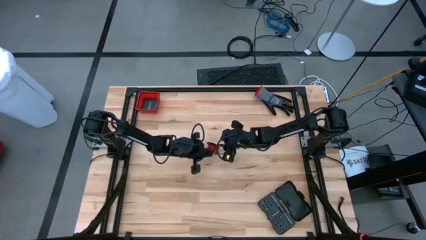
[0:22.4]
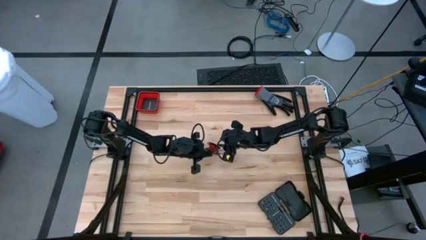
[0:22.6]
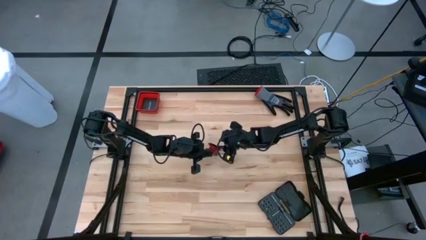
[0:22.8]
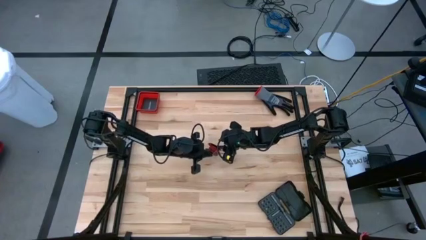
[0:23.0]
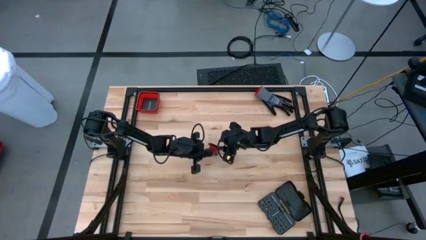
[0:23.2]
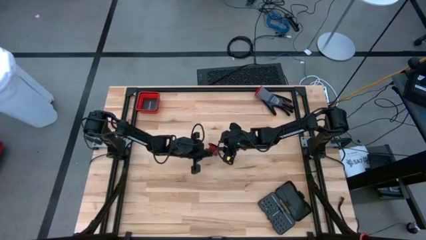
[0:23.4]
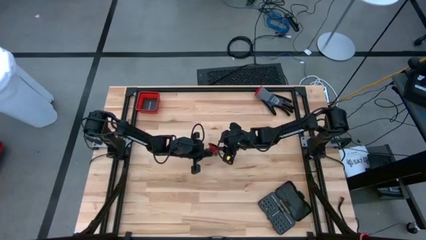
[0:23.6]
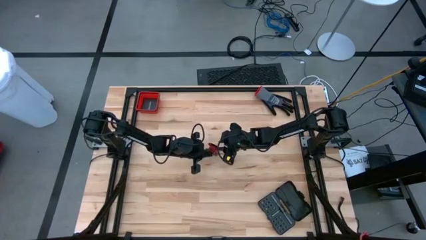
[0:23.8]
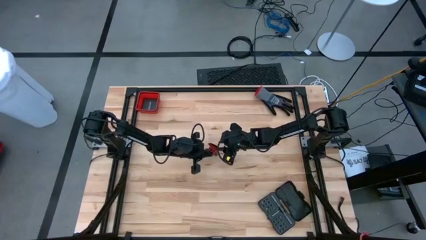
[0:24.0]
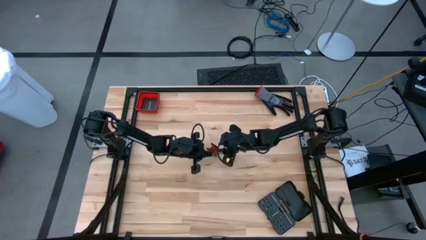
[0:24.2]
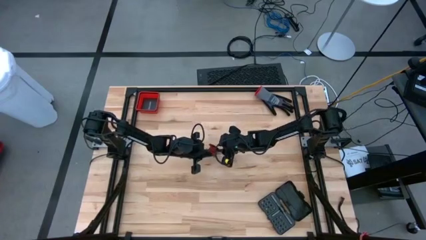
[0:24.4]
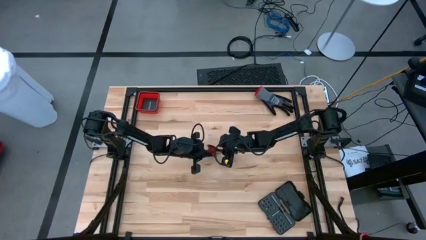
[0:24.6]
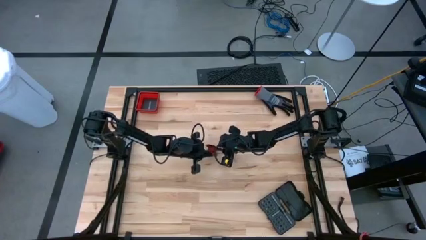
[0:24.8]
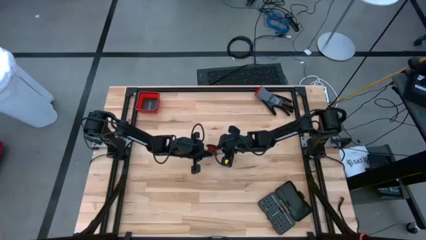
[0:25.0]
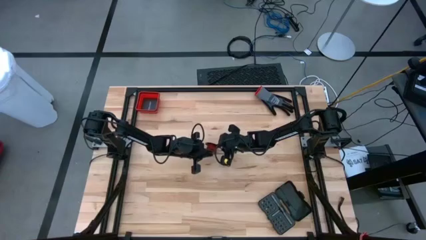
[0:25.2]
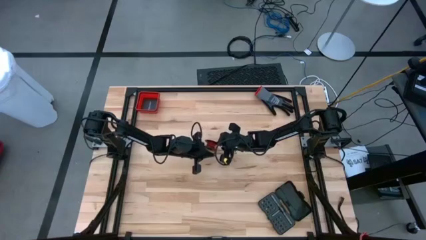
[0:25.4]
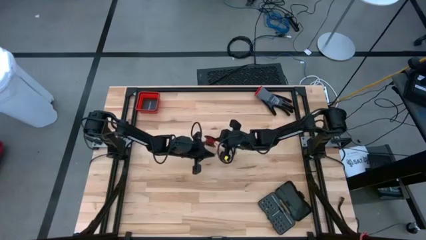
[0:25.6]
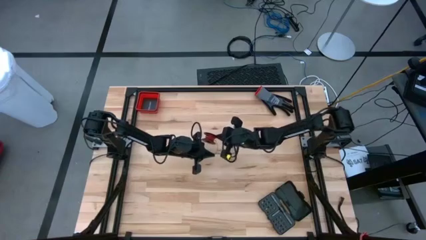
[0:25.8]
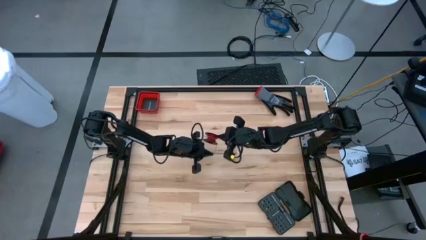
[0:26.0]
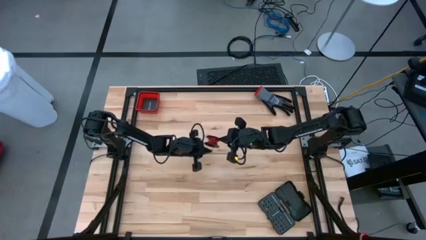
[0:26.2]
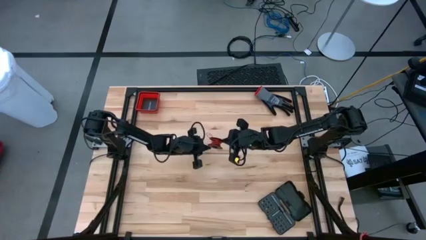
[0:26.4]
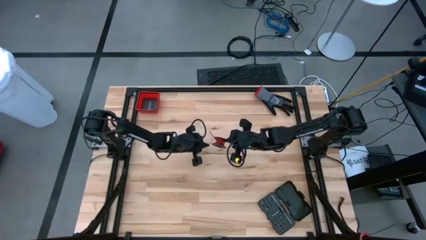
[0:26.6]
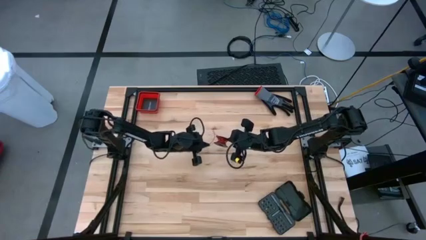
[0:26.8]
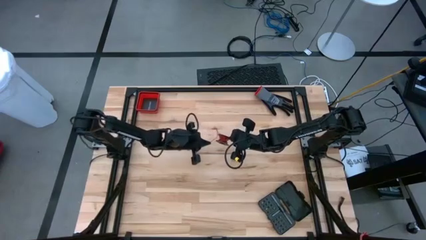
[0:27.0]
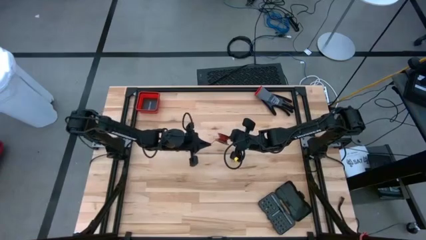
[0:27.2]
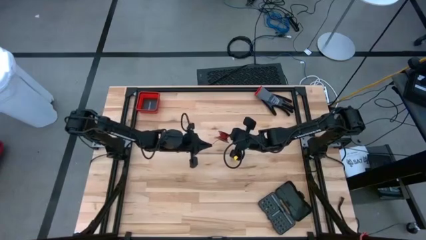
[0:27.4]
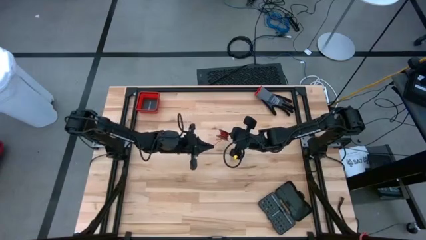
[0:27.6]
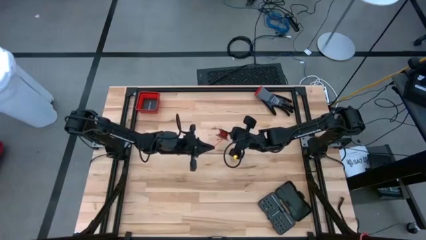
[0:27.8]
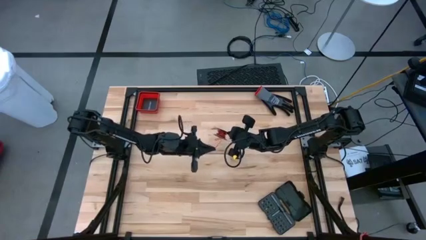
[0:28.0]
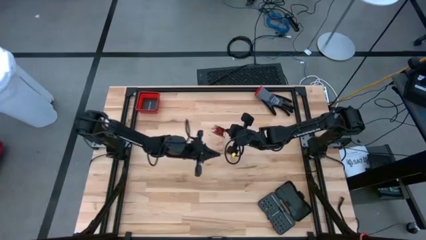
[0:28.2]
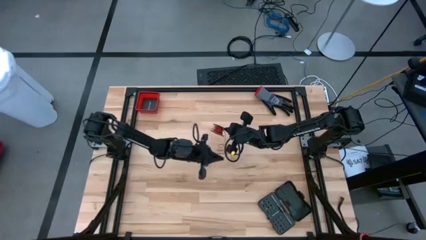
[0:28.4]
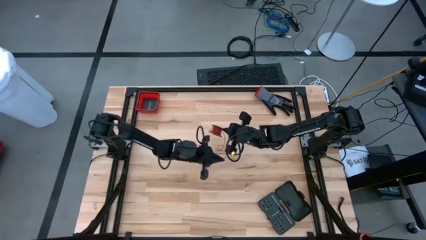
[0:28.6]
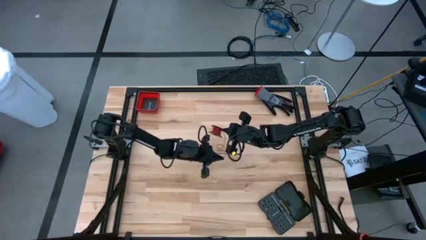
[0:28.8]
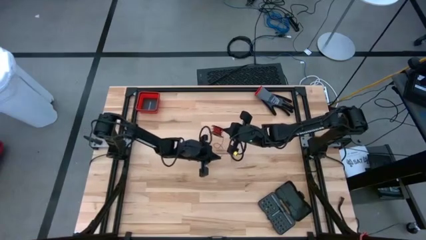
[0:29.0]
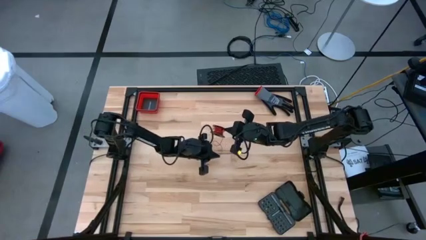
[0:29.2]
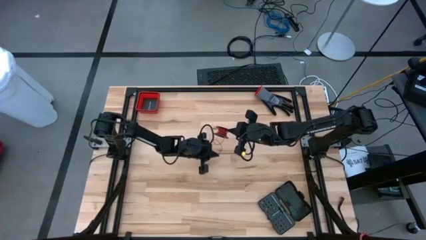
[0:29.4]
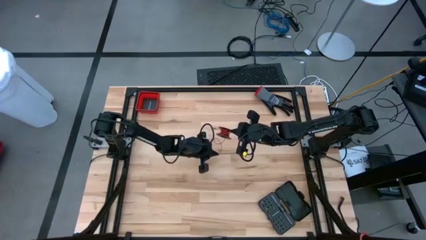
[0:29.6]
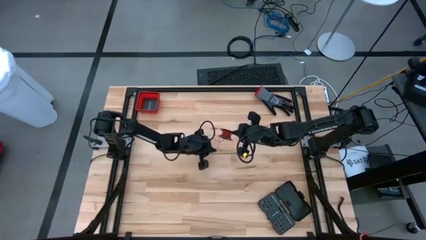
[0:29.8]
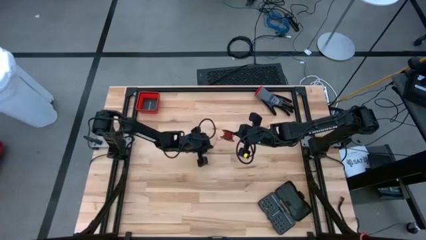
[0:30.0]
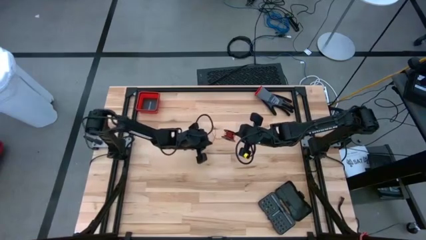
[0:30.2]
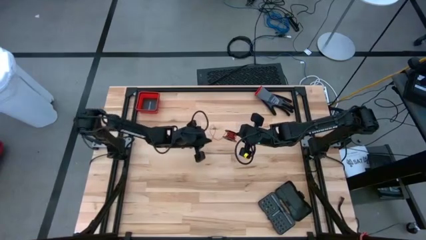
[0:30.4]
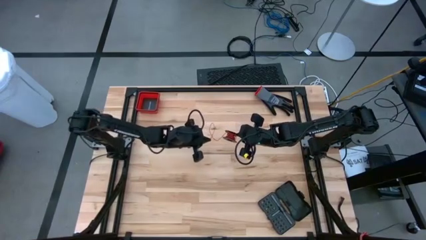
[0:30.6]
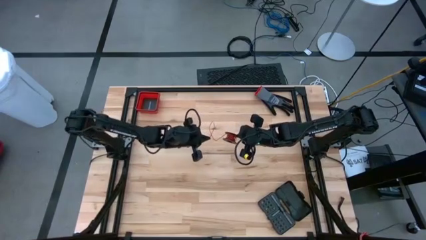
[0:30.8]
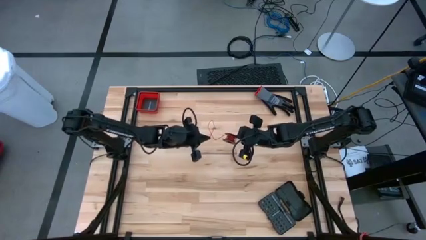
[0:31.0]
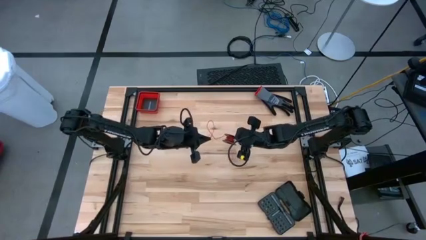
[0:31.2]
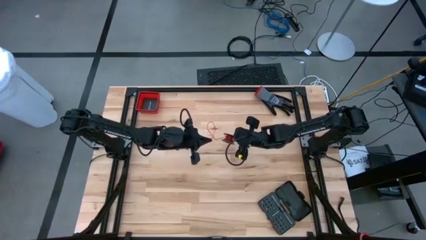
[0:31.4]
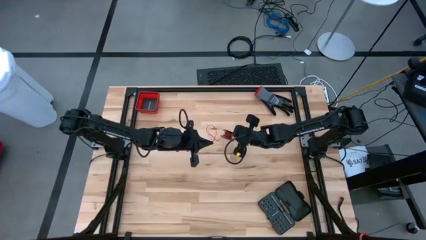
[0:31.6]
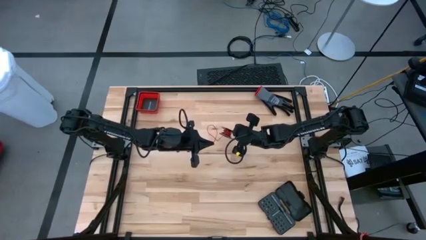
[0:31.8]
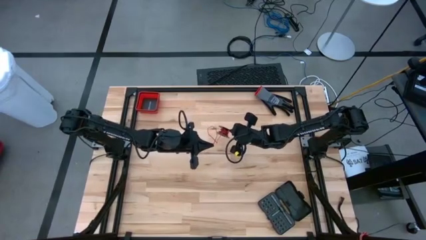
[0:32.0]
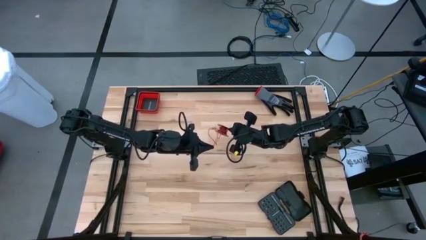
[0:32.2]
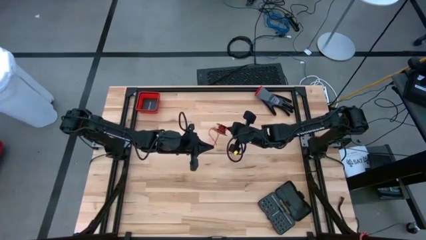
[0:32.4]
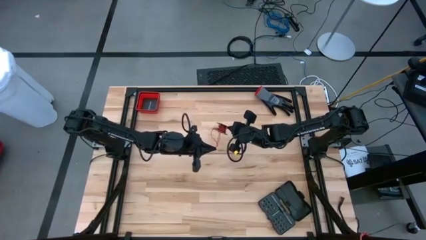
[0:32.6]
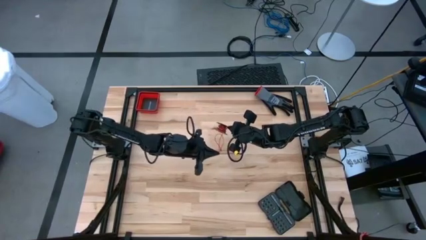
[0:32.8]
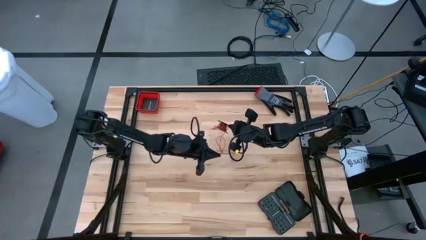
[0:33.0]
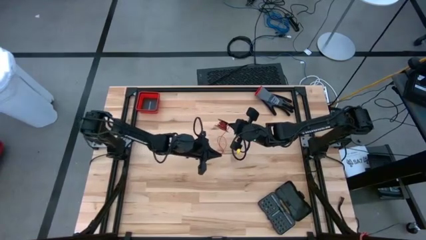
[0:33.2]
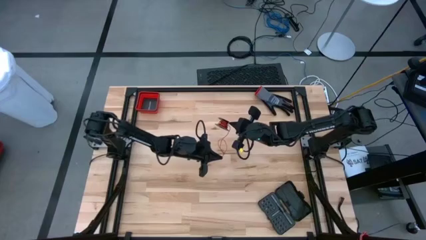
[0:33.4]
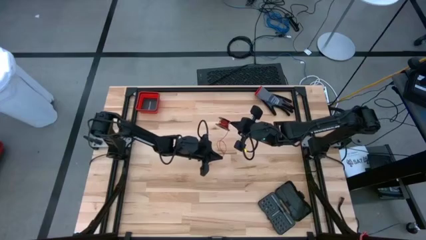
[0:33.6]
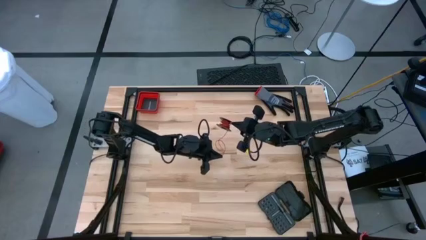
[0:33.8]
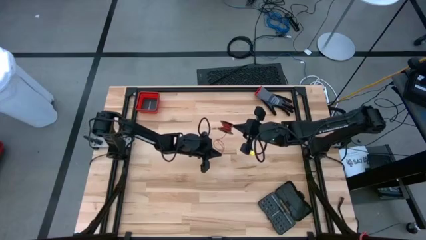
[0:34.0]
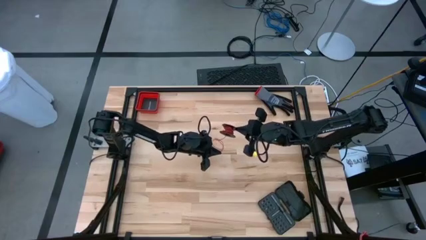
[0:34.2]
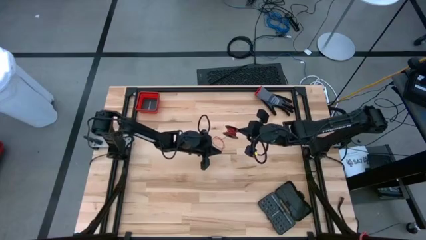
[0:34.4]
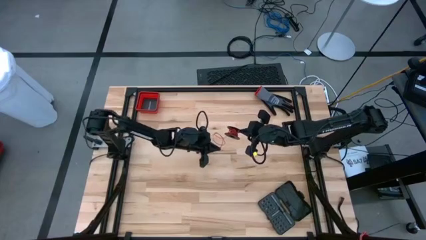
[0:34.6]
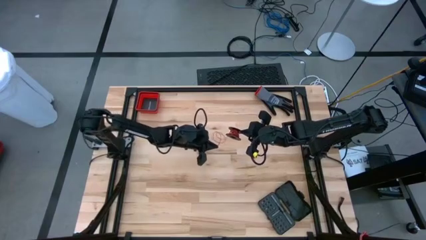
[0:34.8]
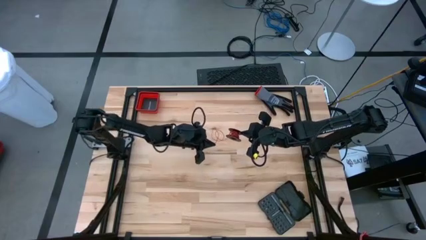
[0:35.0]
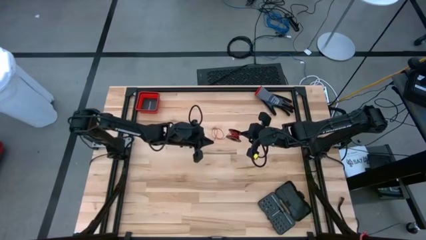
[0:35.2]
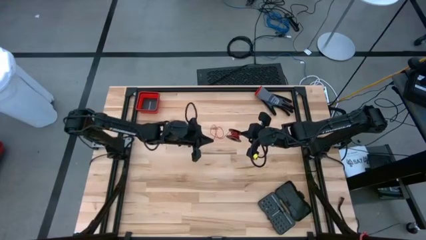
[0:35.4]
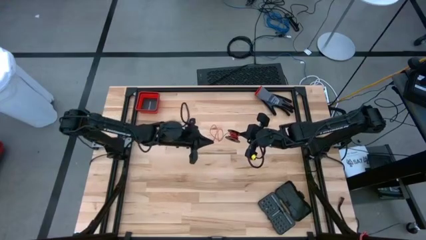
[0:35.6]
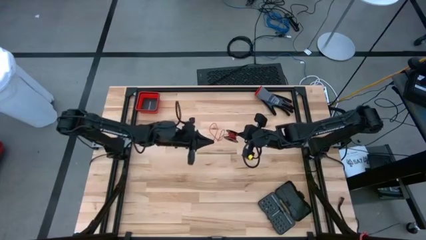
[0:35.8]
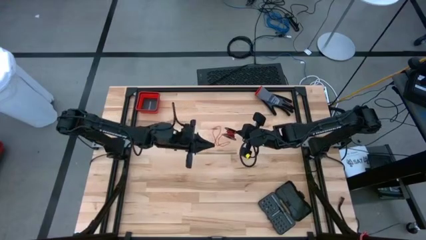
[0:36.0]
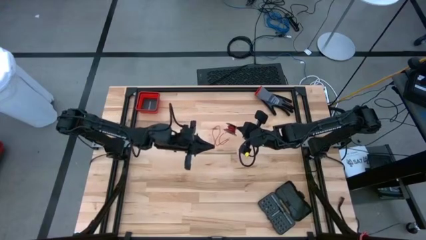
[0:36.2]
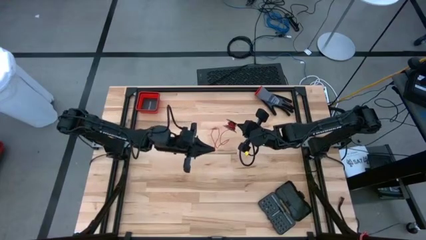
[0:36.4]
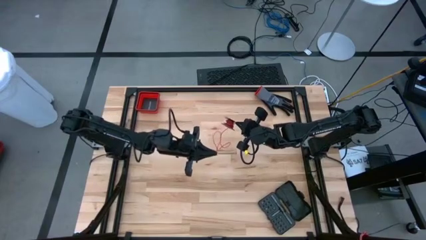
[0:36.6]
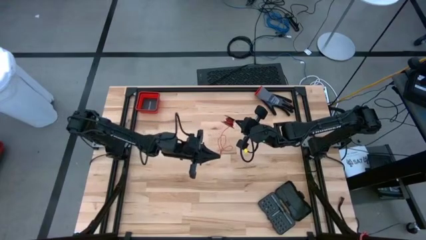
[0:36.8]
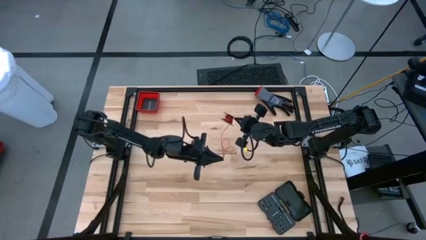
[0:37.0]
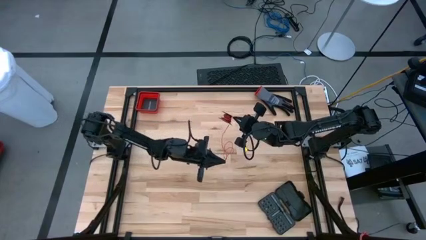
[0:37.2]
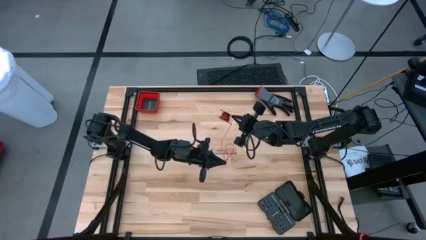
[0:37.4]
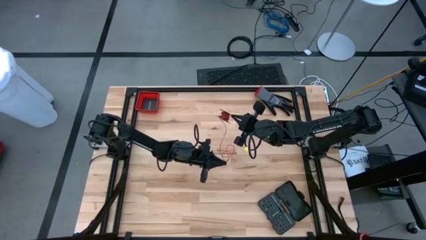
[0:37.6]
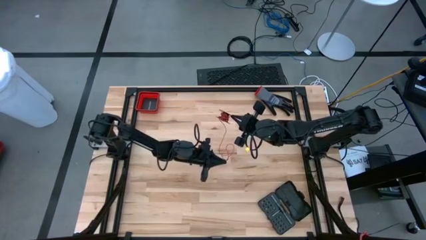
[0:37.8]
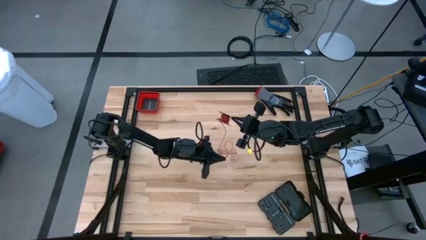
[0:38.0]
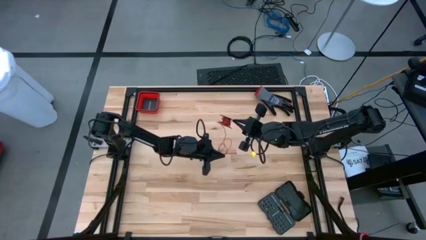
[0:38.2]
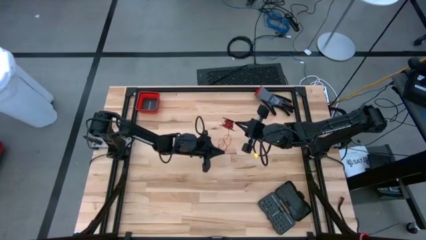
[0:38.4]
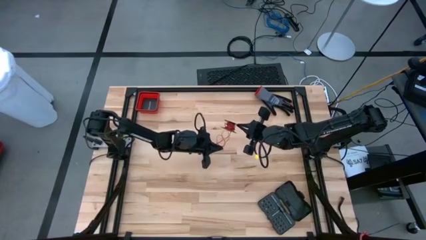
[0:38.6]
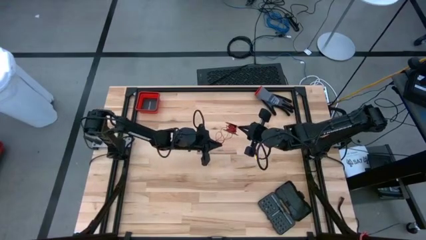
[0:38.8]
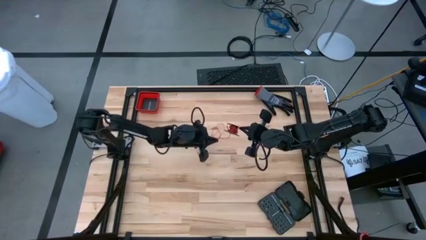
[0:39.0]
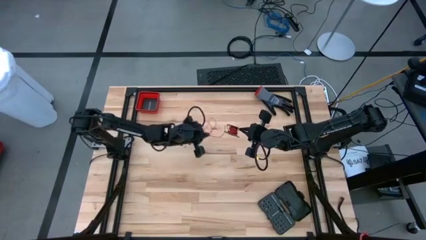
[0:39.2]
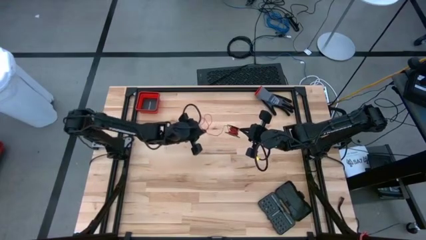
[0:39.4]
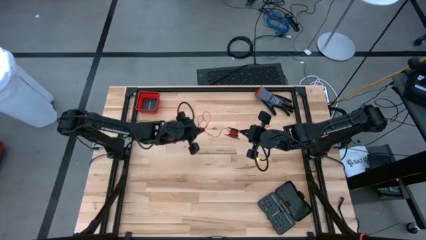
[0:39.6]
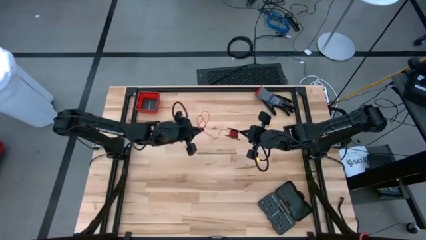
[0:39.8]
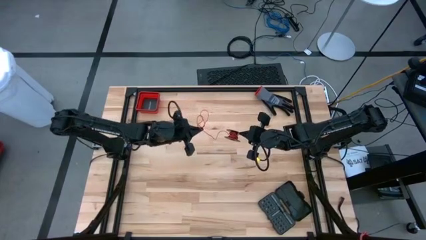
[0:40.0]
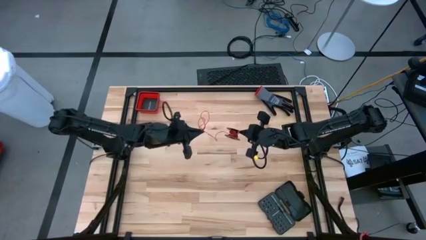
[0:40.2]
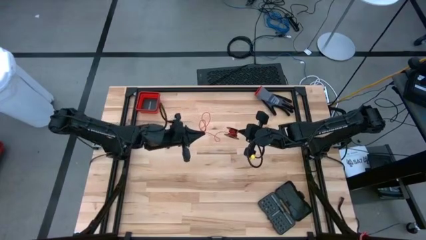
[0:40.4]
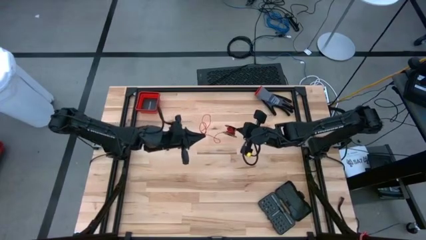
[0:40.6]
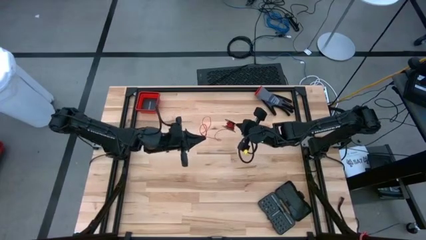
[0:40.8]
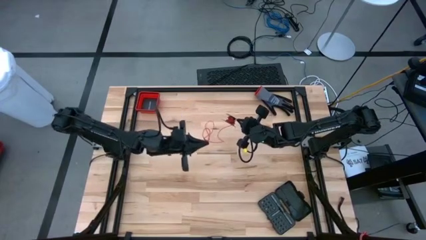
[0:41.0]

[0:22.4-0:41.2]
Task: Coil cords
Uncoil the red wire from the spool
